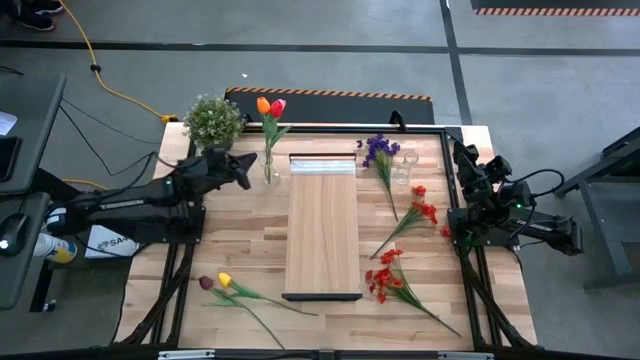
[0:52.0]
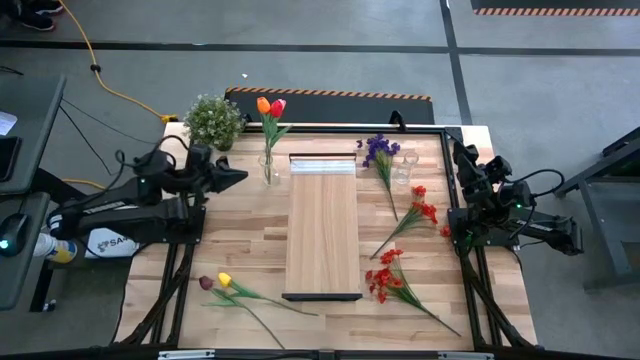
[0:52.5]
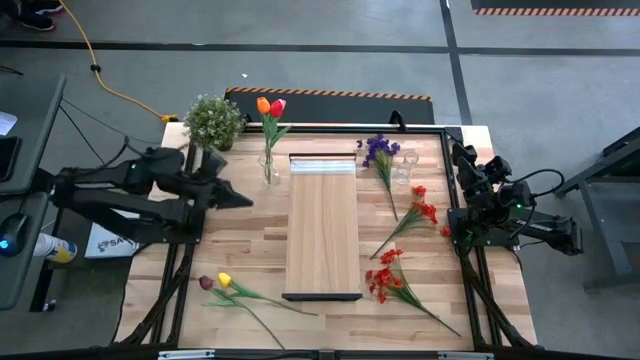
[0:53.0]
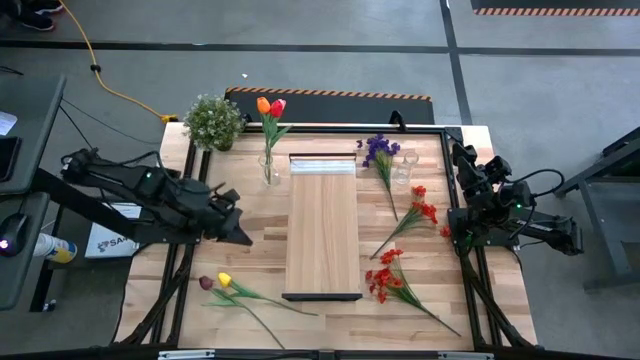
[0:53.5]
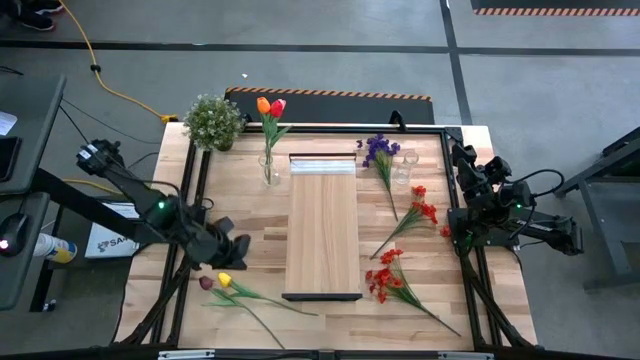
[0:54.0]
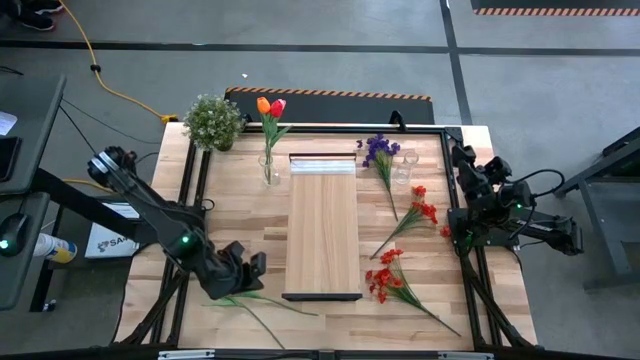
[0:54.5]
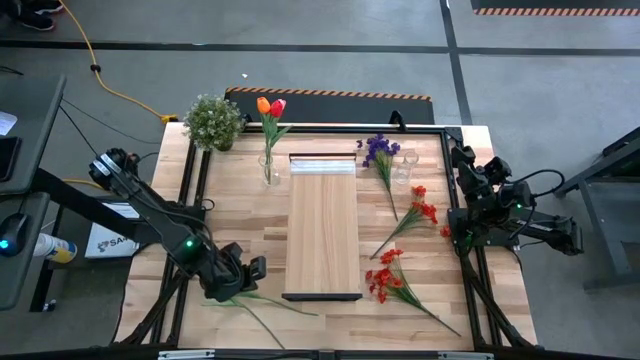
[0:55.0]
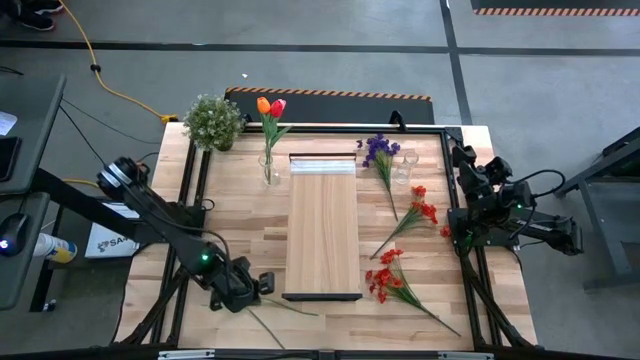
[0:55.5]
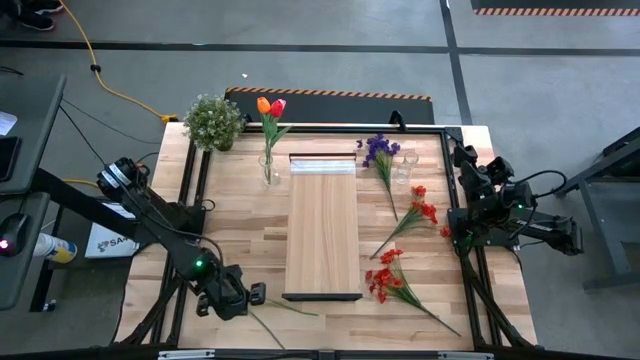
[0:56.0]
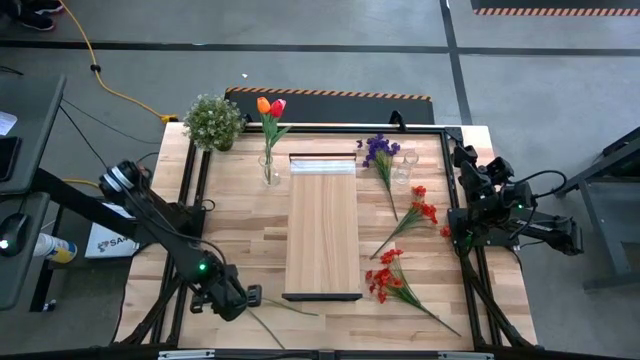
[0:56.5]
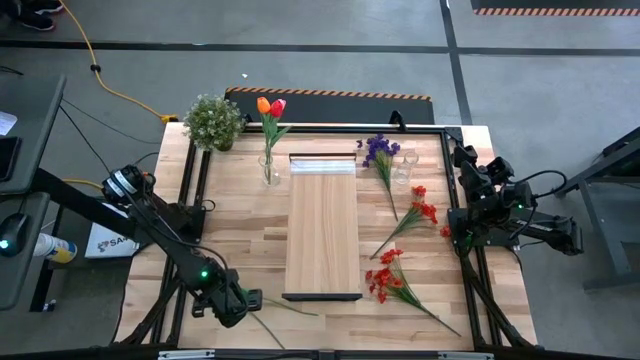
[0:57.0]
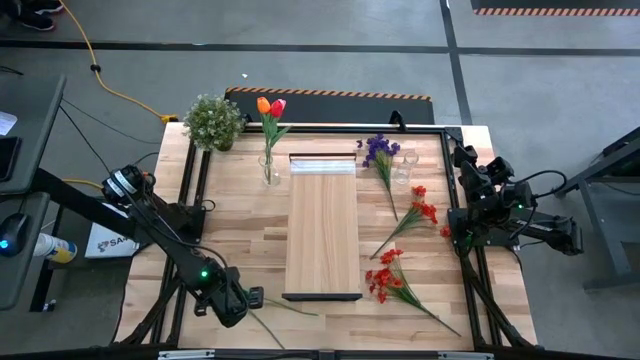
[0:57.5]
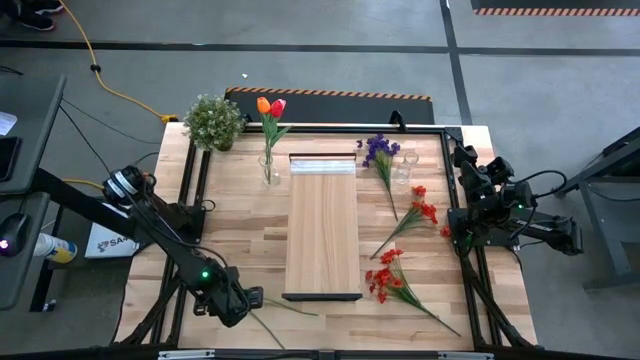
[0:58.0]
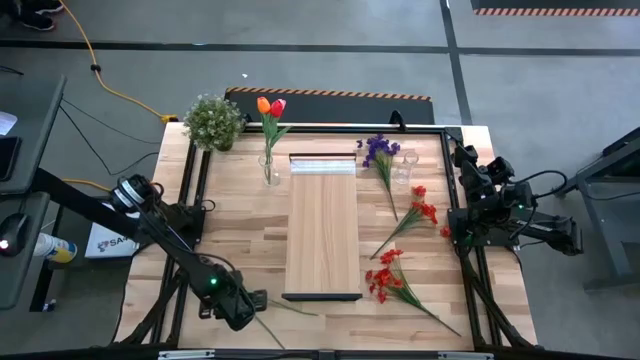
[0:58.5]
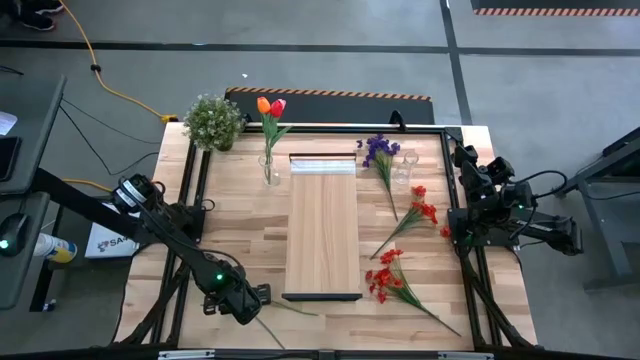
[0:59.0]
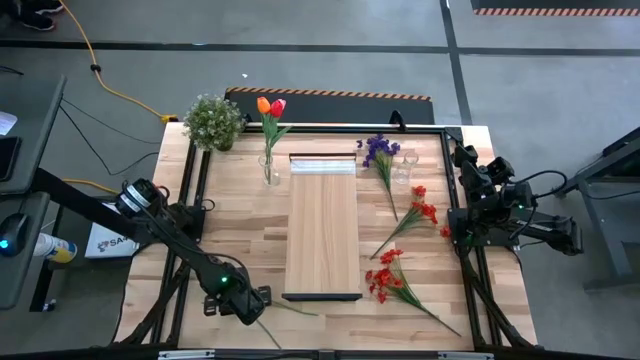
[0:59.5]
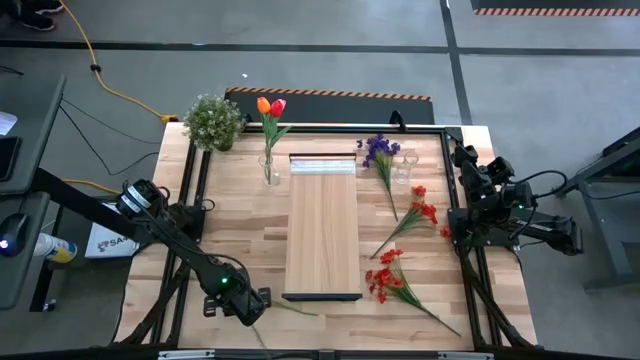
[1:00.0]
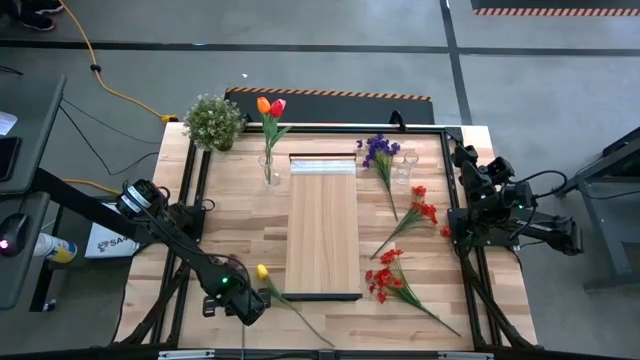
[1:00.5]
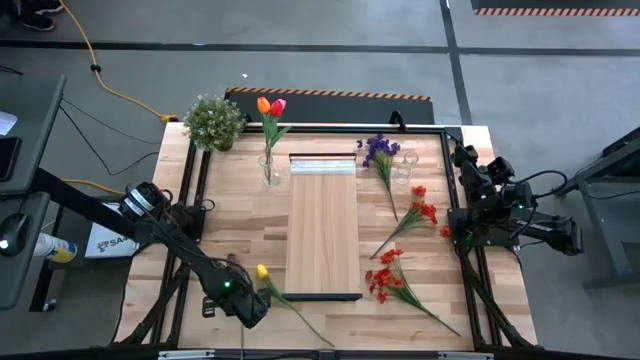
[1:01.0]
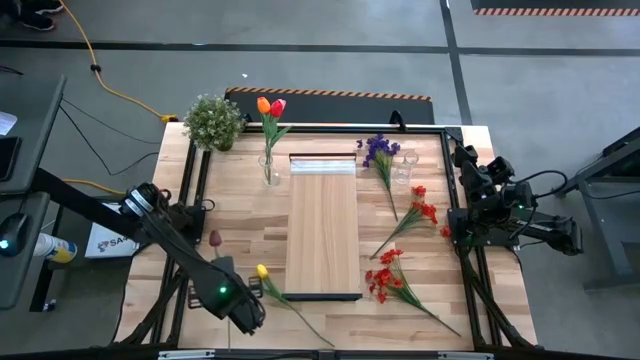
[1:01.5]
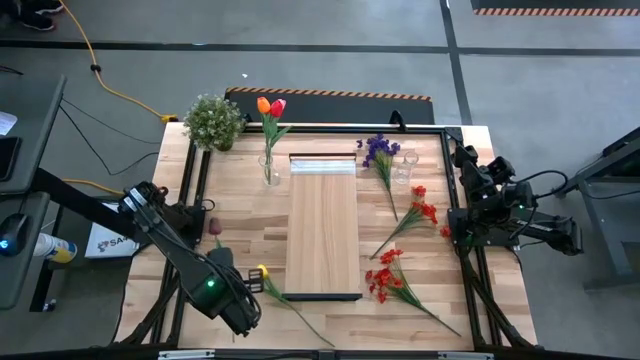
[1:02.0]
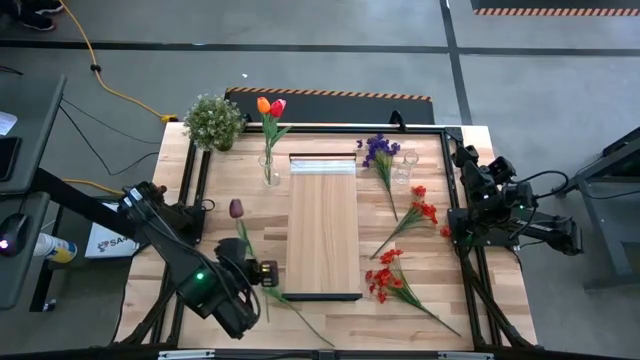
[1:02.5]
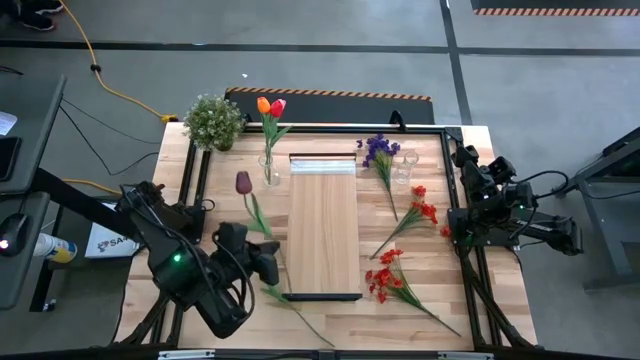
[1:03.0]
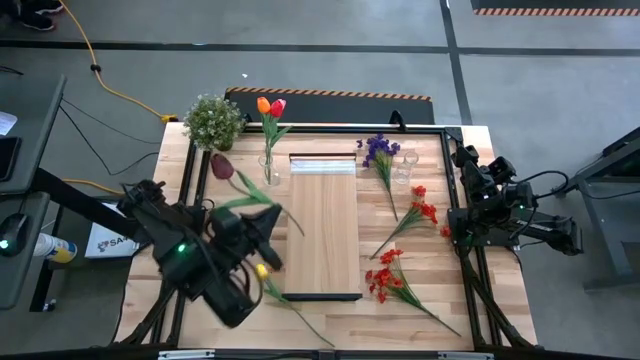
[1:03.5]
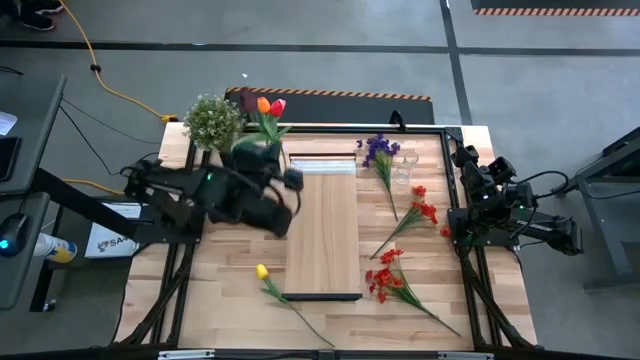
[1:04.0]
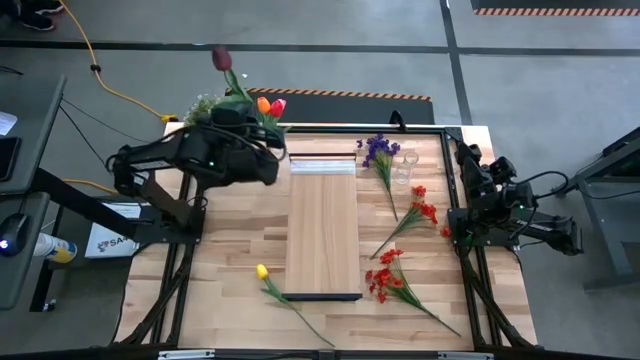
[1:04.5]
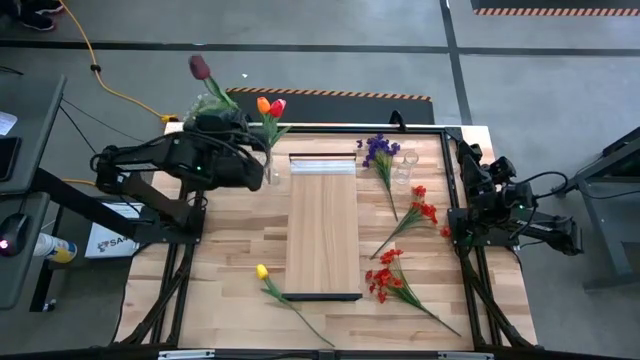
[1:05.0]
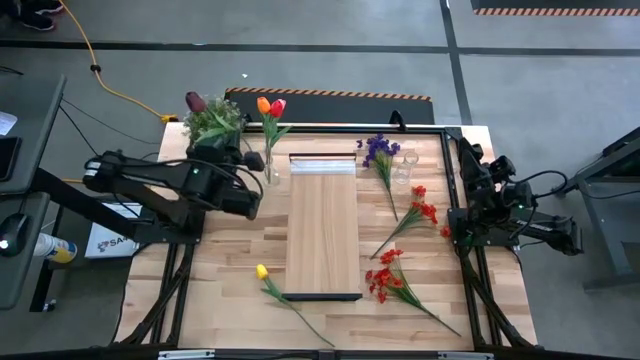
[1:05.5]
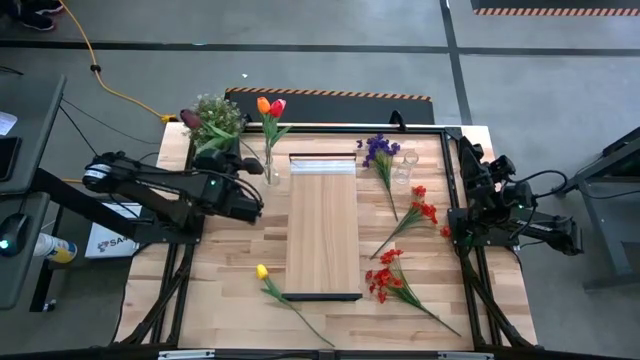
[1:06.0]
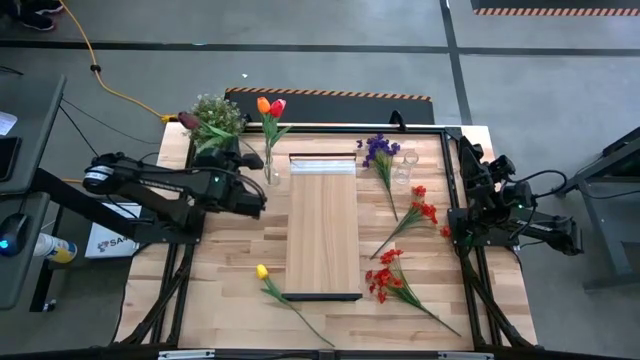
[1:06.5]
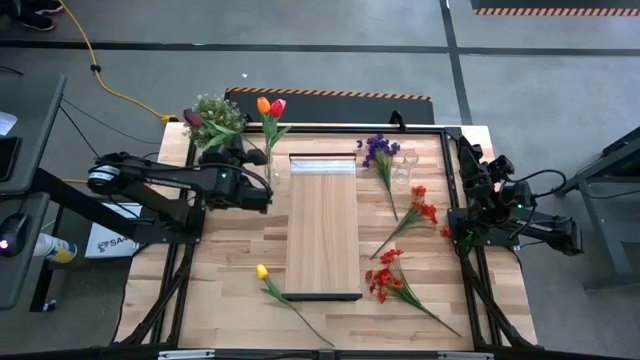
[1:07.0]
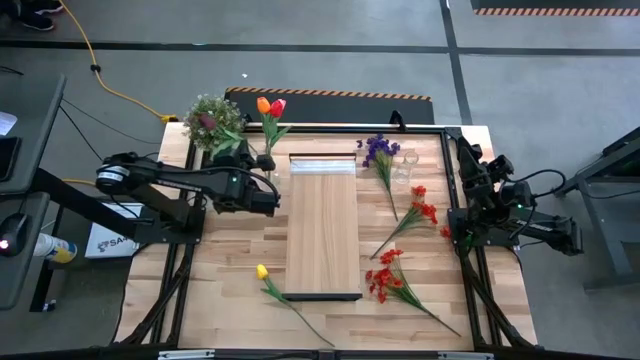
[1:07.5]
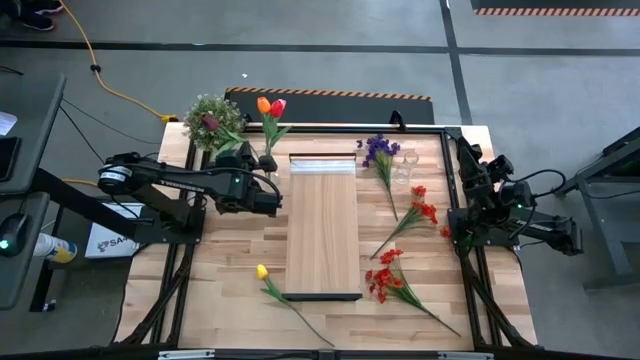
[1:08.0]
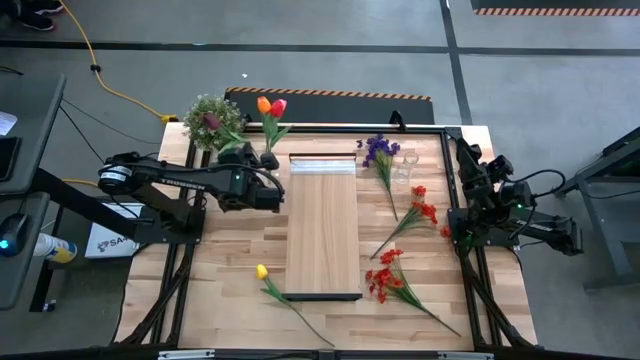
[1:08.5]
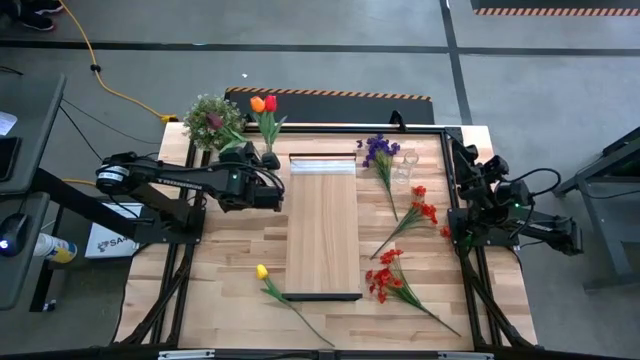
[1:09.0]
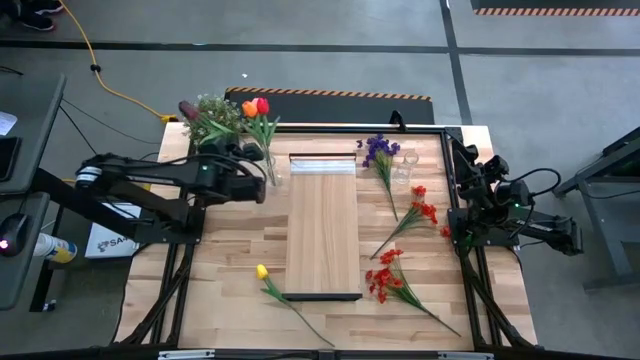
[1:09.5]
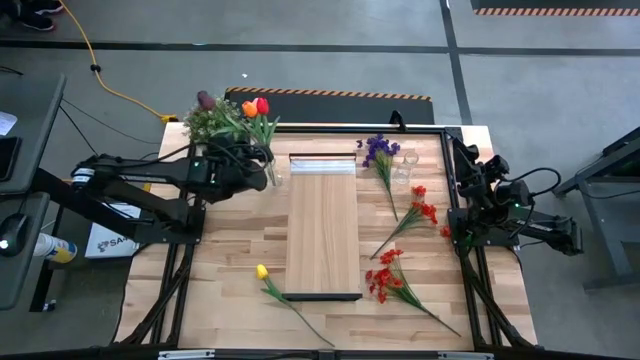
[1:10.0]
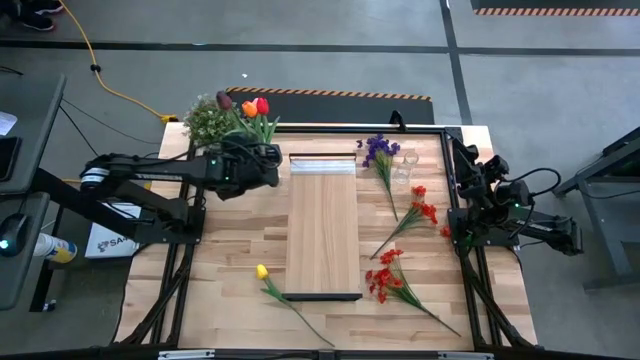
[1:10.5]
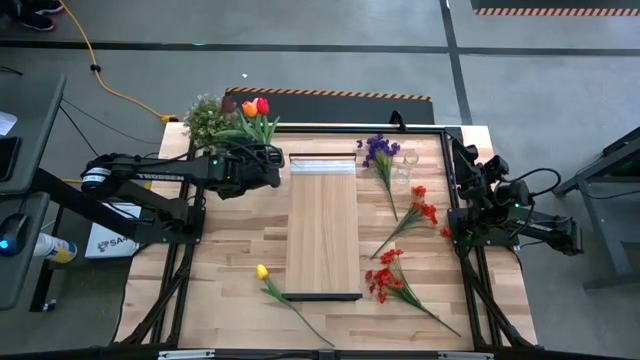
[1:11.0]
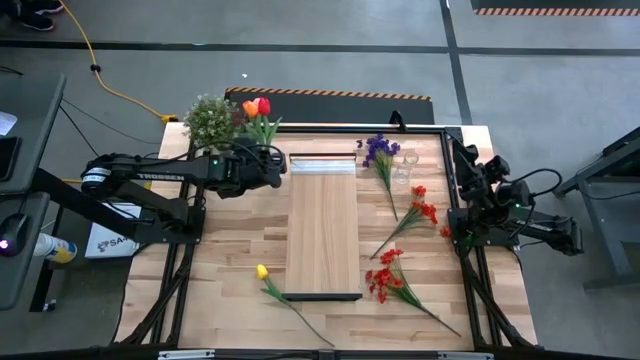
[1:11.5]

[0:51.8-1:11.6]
Task: Pick and place flowers into a vace then onto a shelf
Put the dark red flower into the left transparent vase

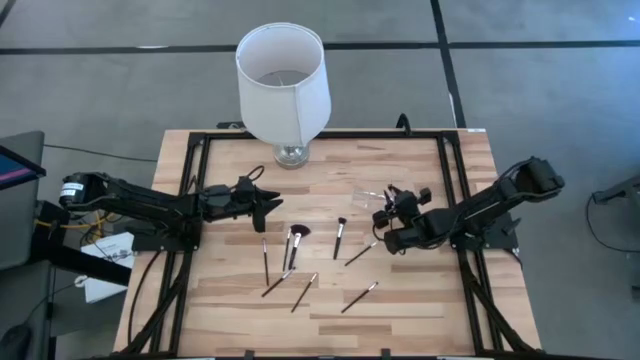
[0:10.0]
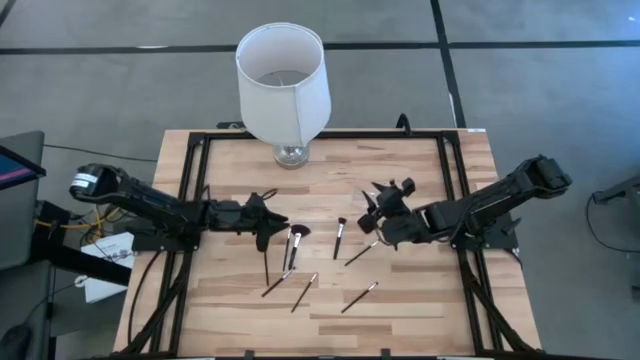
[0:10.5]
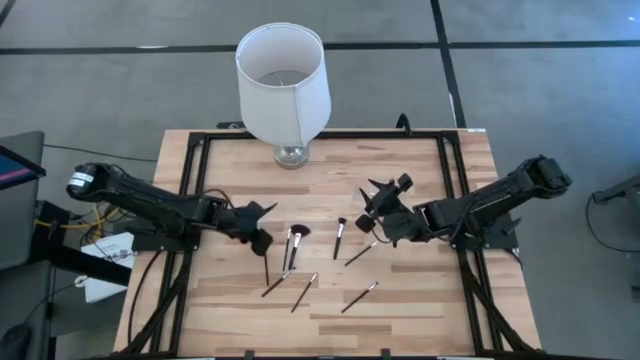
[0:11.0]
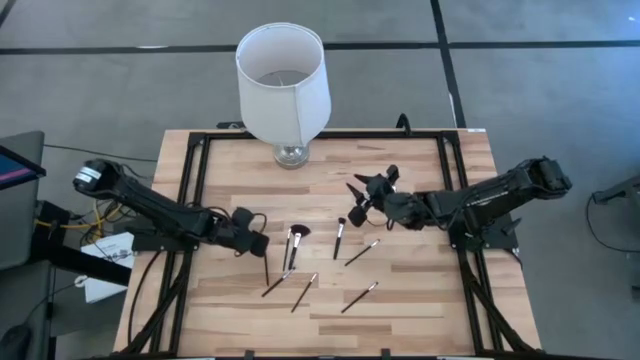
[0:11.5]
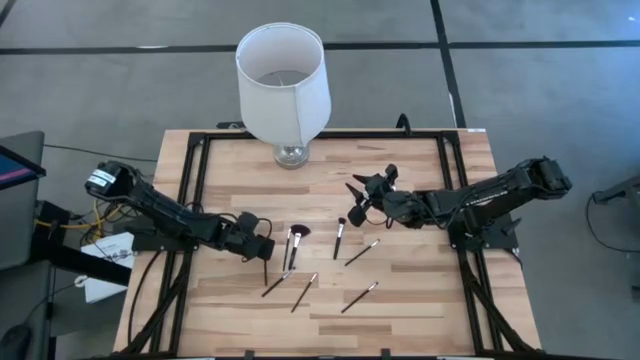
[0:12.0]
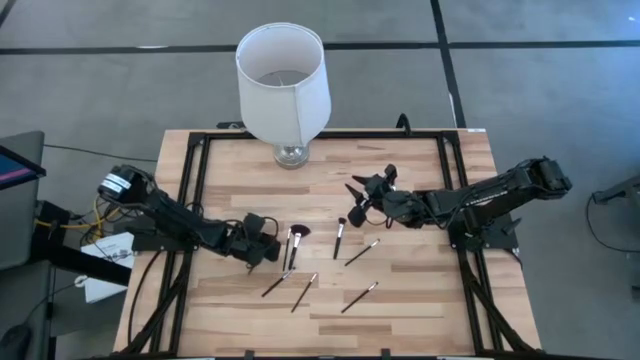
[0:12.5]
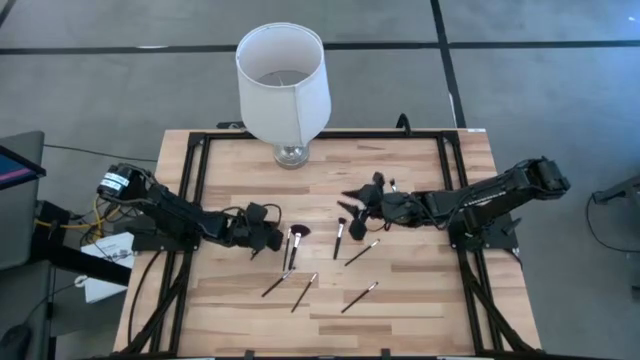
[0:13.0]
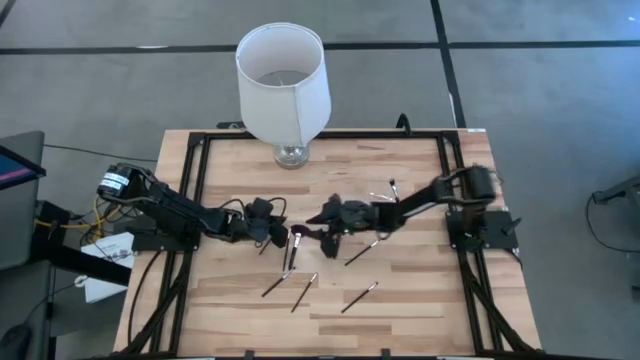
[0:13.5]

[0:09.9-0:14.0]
Task: Pick & Place Makeup Supplies
Put the black makeup brush into the transparent organizer
